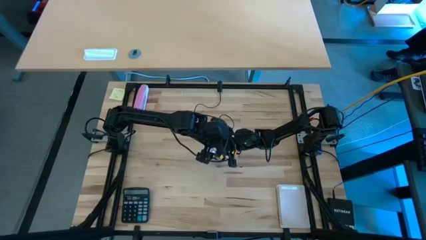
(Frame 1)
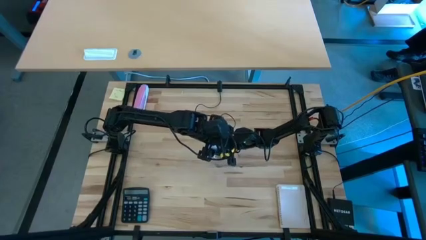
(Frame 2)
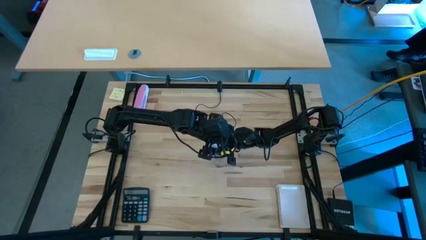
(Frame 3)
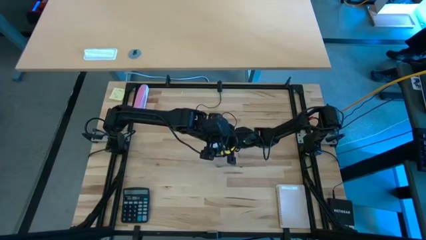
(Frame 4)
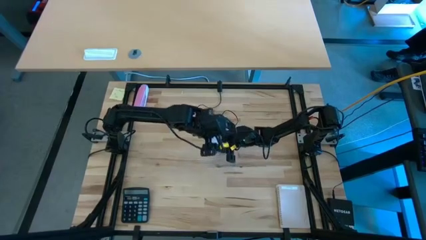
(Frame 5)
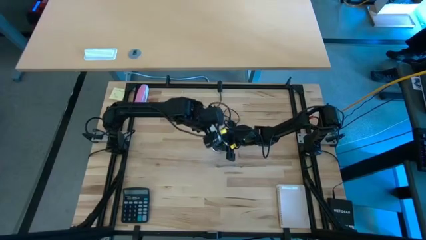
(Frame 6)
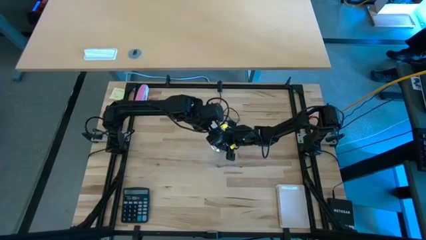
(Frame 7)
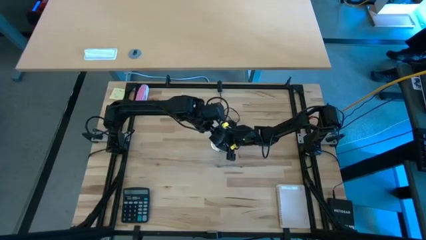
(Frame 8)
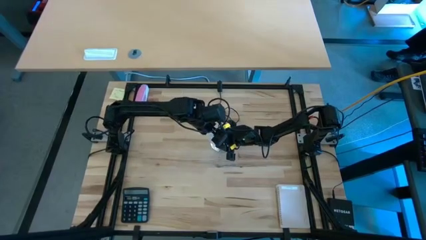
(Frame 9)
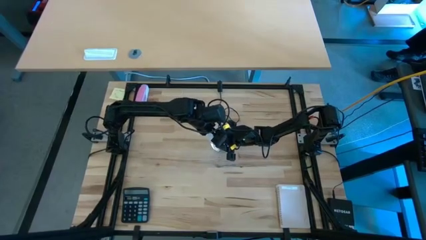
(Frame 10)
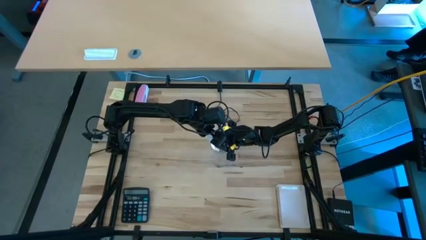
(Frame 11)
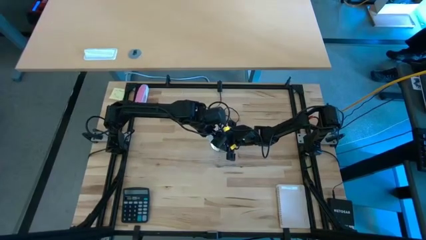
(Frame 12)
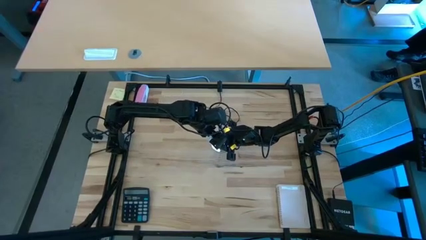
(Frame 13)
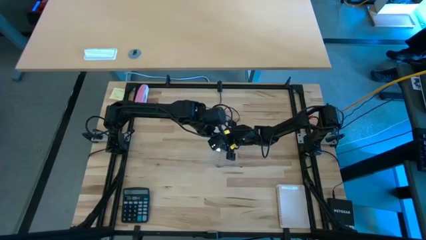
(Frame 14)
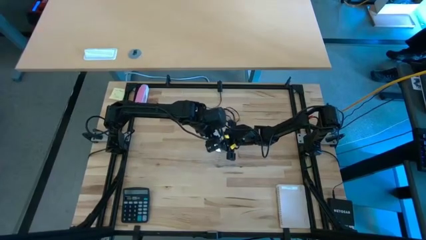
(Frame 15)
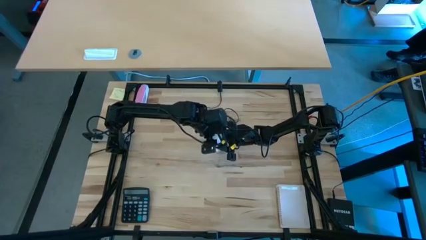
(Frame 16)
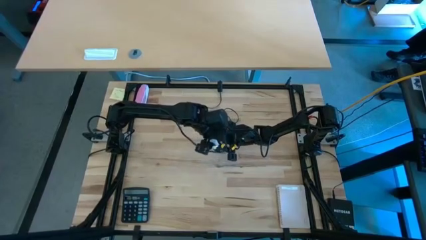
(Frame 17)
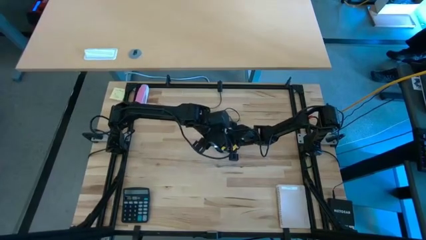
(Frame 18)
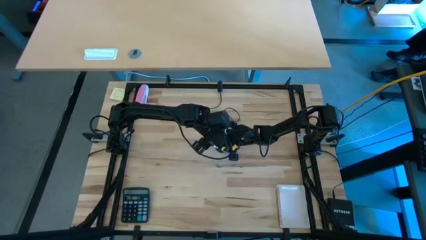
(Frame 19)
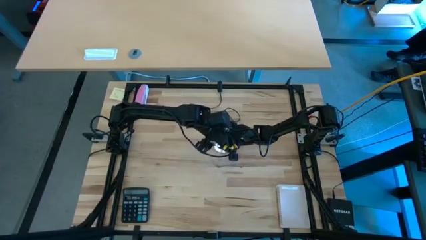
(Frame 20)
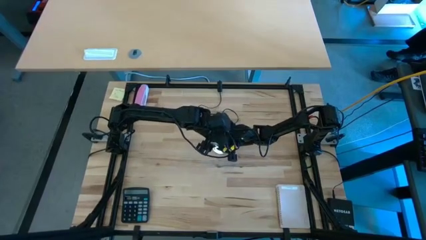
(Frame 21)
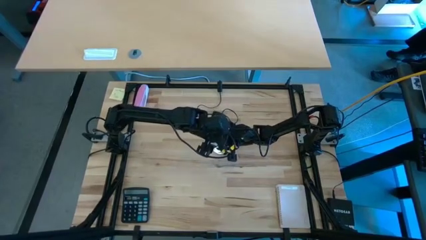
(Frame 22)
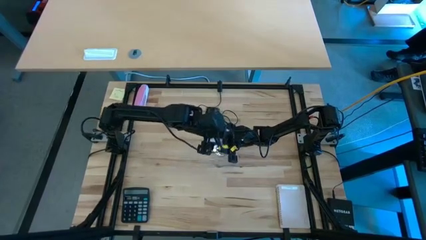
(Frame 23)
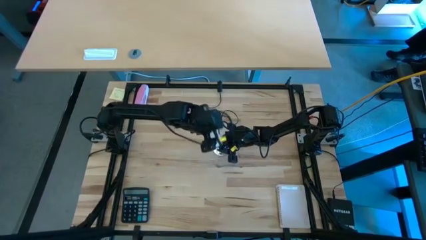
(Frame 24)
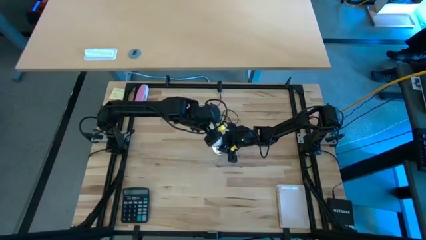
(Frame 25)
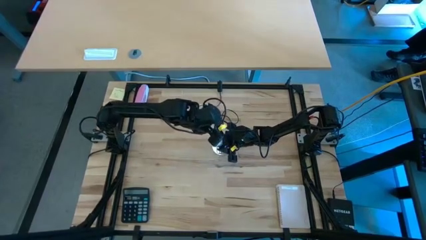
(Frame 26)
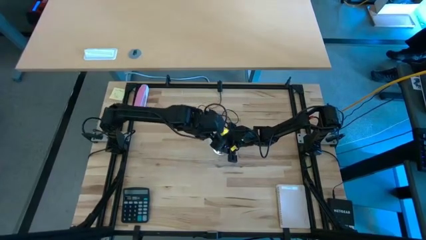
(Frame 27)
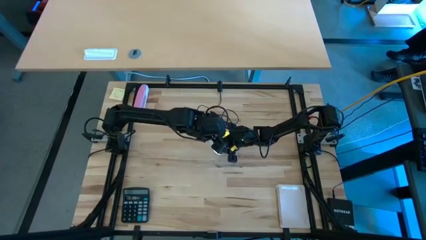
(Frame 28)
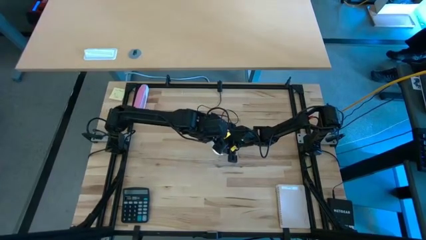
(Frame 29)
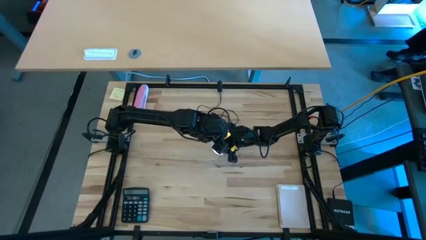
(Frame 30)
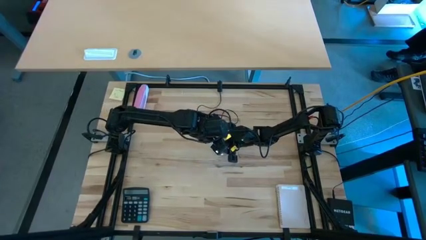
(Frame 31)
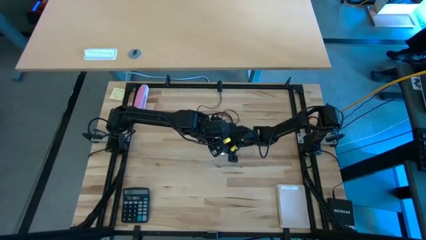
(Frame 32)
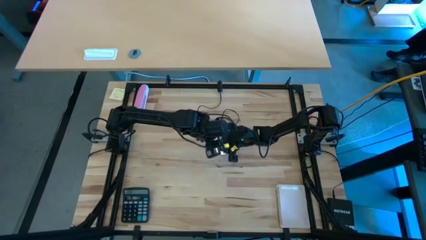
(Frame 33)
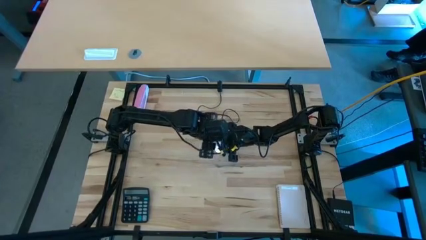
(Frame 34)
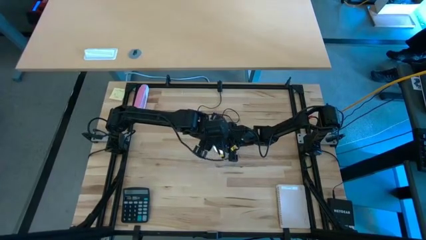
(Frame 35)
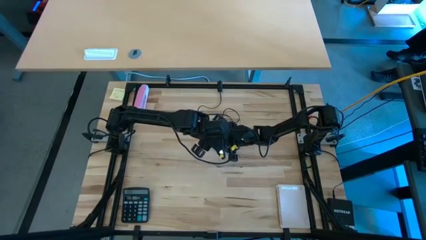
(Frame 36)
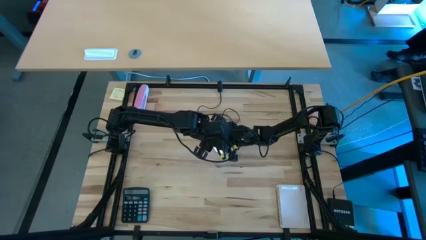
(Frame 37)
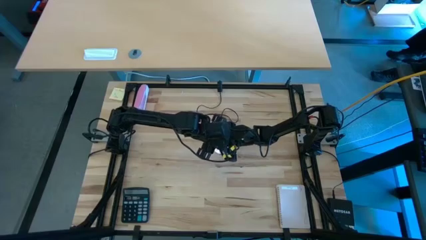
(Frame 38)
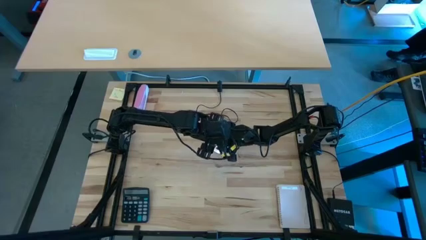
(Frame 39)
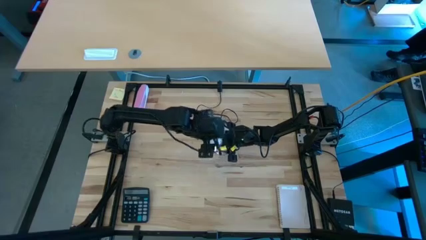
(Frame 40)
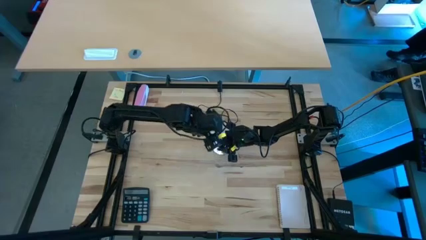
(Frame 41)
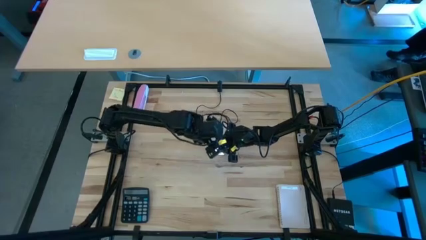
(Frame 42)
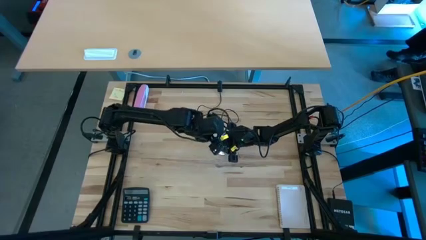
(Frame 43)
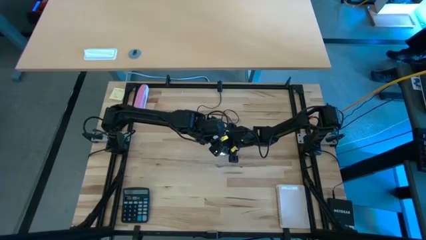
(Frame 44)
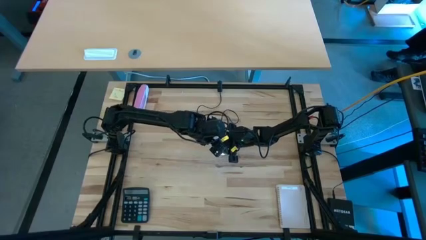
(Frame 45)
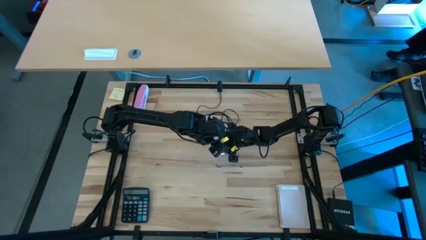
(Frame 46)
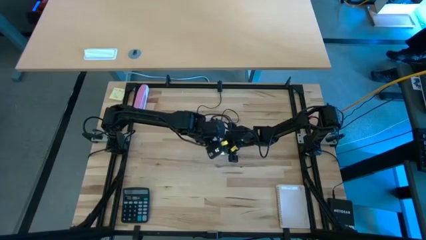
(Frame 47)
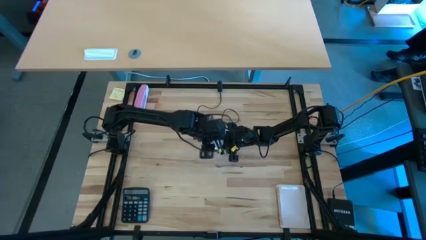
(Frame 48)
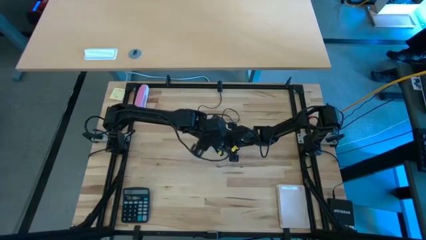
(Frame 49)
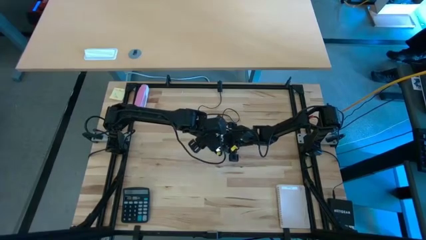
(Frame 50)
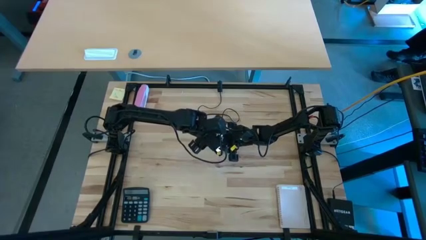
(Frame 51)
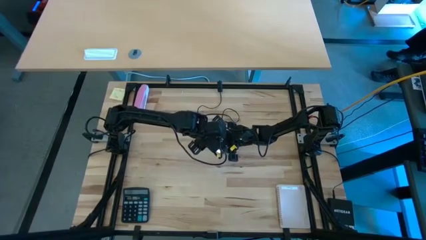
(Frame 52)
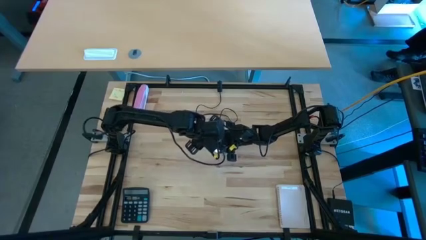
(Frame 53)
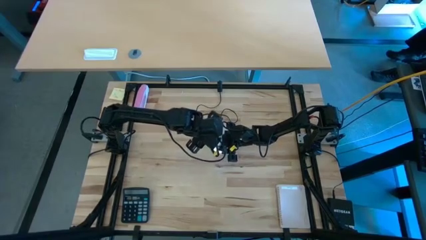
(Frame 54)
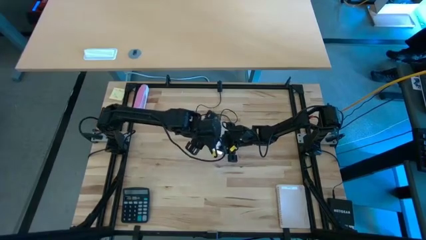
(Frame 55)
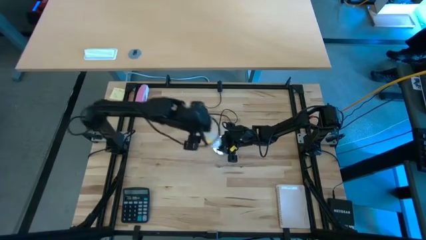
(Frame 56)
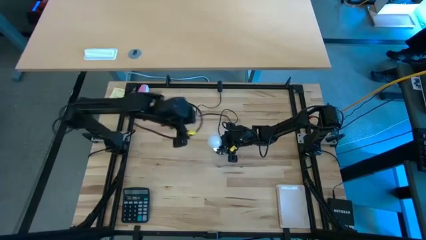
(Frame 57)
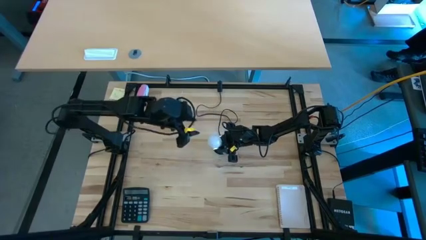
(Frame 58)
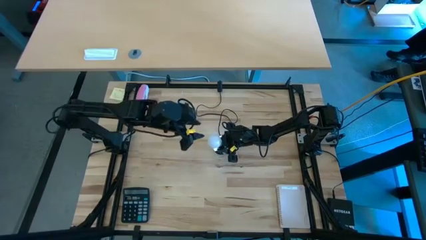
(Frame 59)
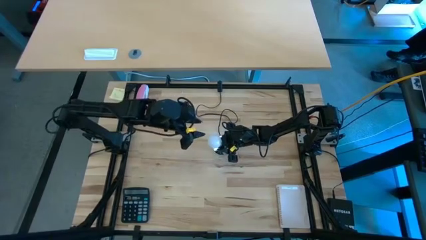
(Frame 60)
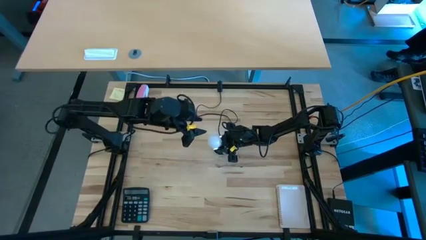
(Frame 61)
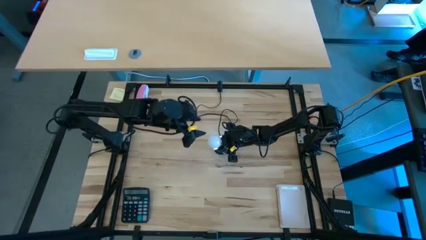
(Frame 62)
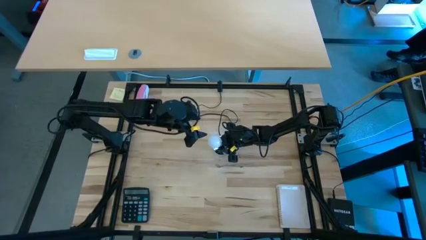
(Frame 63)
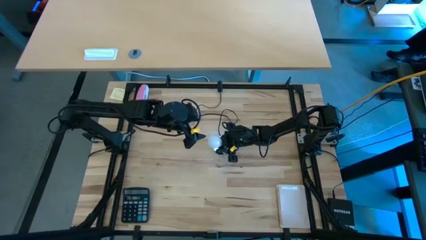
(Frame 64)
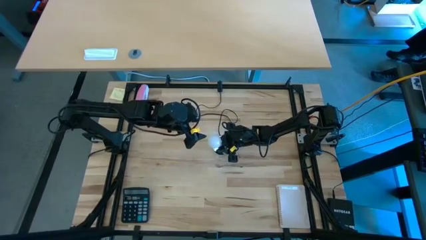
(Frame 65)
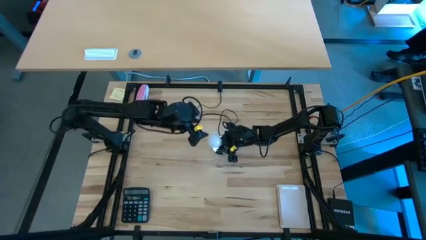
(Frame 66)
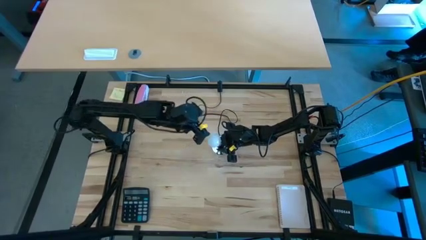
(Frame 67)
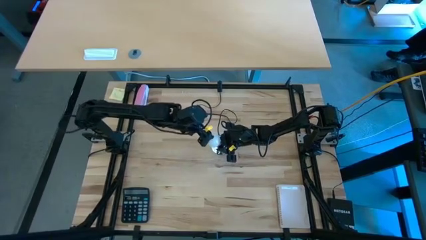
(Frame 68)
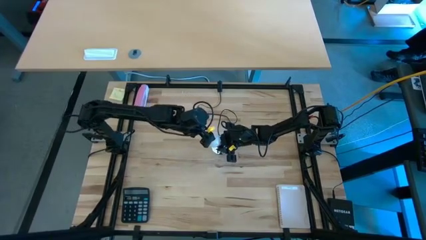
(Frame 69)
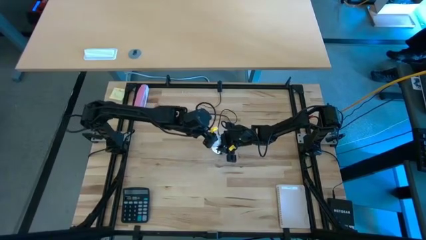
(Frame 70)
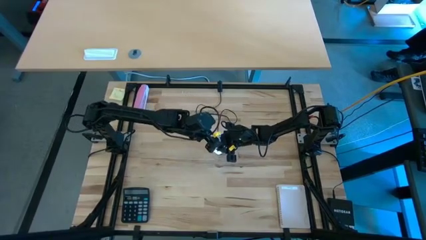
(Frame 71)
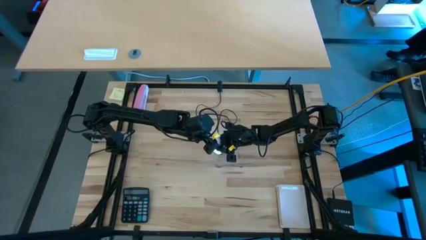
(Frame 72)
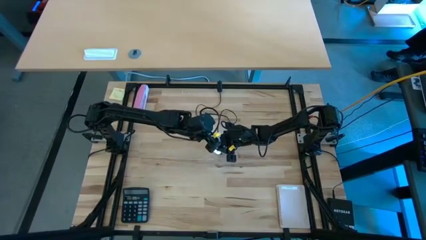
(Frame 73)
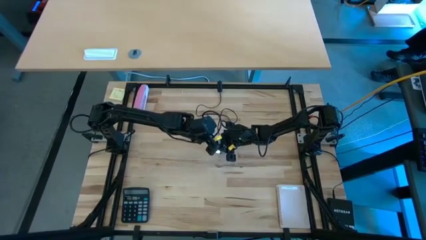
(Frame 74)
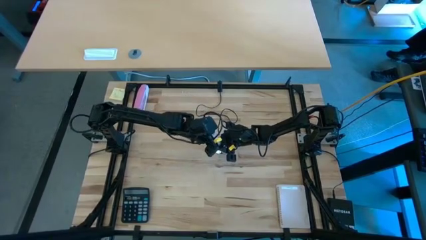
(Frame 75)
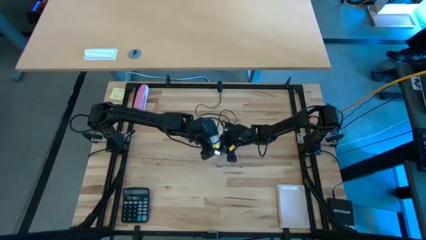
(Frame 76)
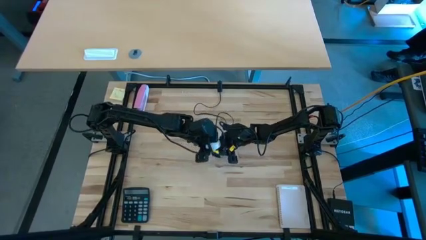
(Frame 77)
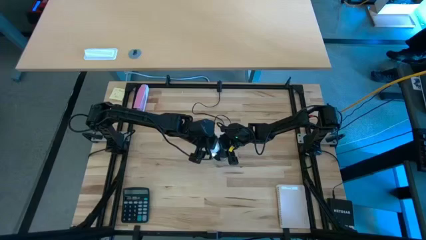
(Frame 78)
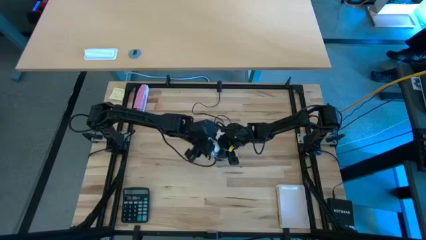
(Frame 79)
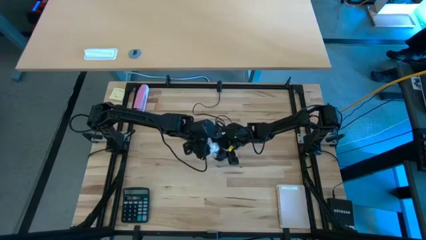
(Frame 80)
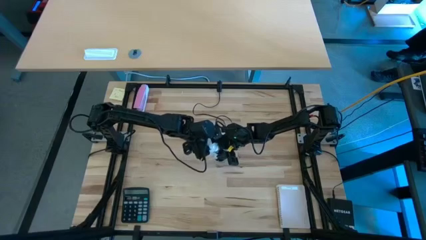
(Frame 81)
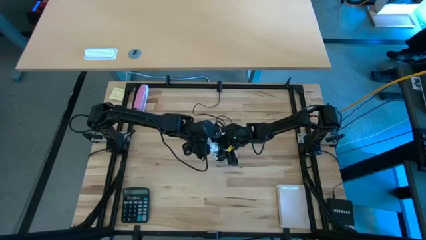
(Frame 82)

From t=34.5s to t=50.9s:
Task: Screw lightbulb
Insert the lightbulb into the lamp
